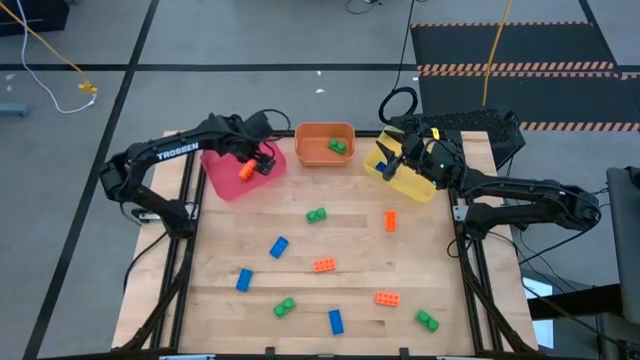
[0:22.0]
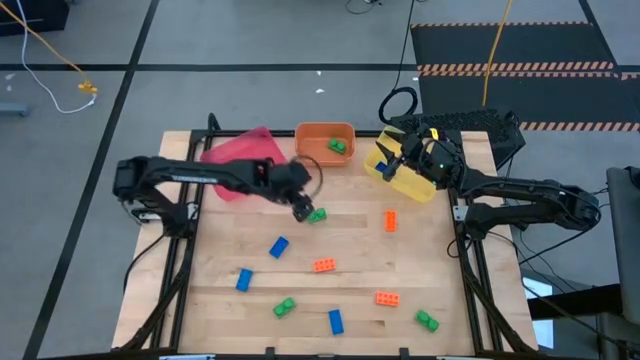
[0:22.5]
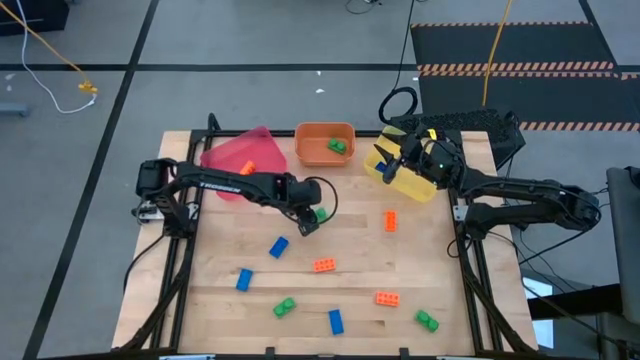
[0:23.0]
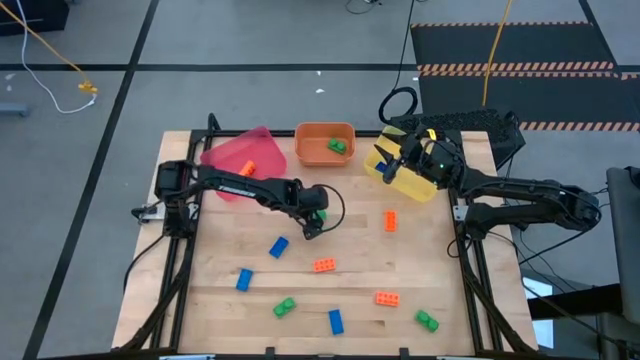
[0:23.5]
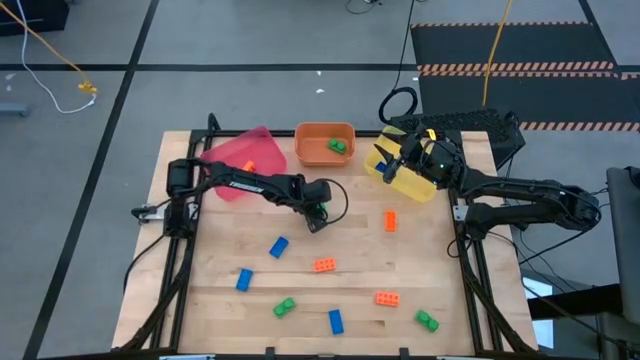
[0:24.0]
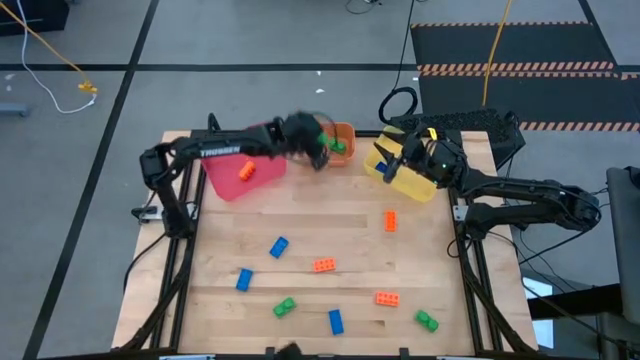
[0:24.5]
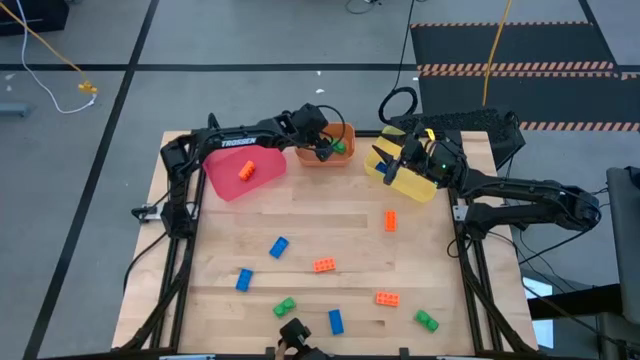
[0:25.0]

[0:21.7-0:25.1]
Task: Sort & place blocks by color
Put the green game piece into the orange bin

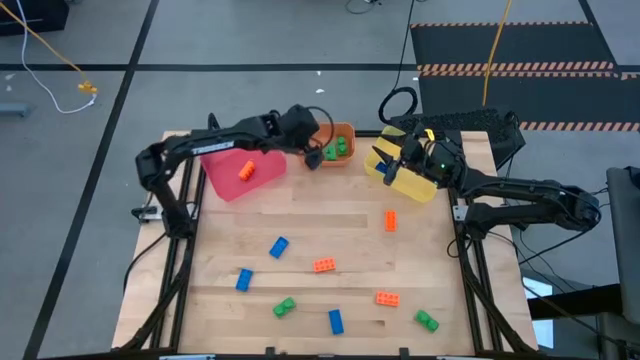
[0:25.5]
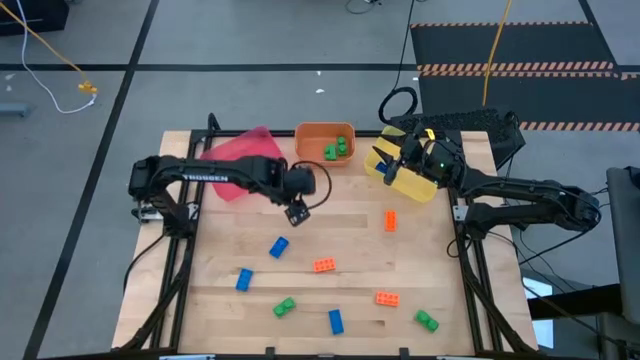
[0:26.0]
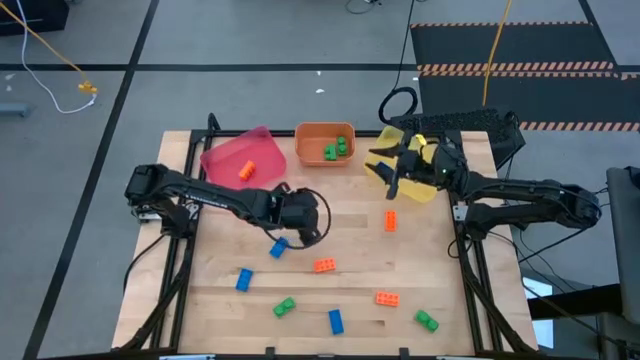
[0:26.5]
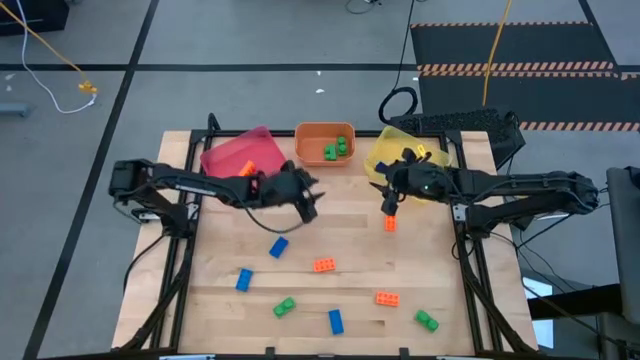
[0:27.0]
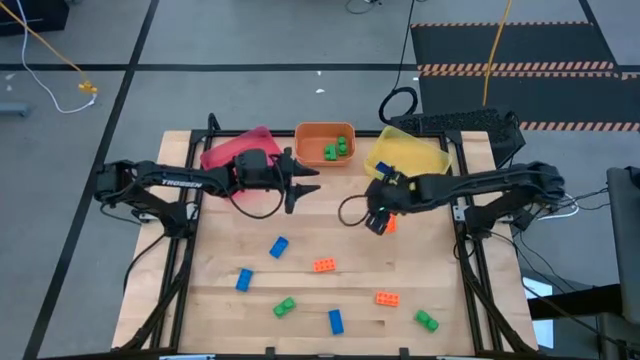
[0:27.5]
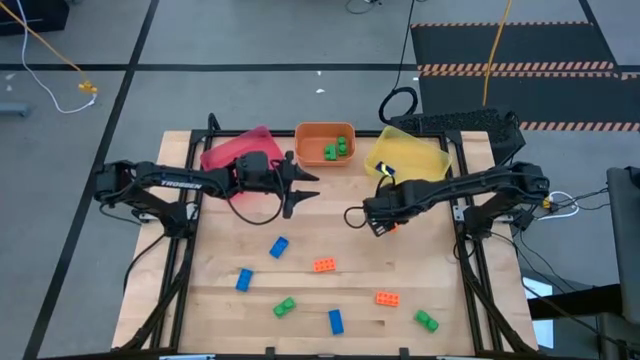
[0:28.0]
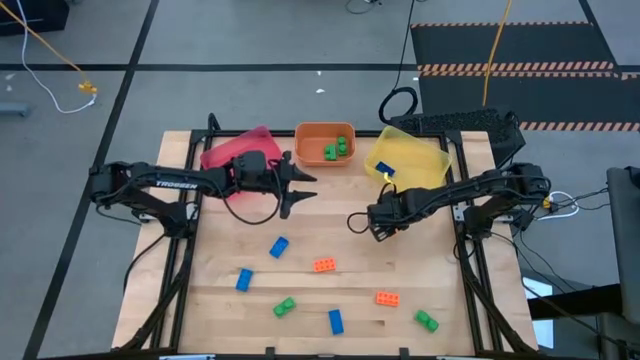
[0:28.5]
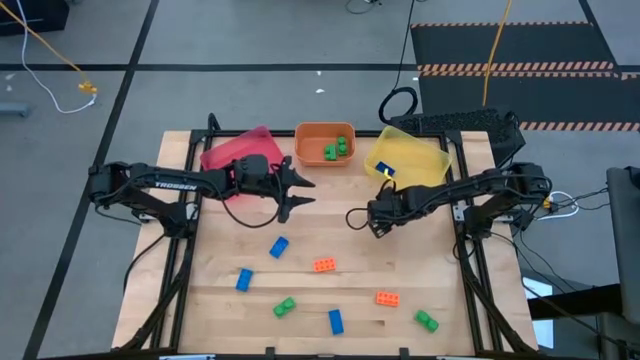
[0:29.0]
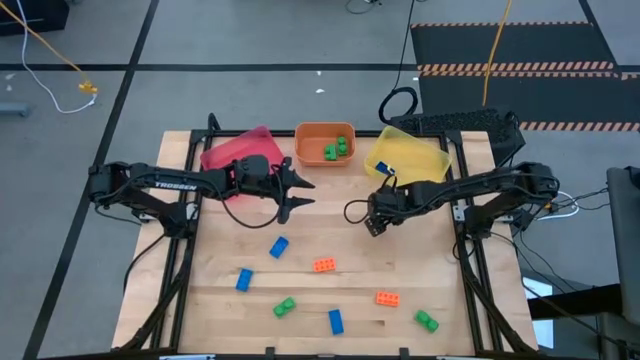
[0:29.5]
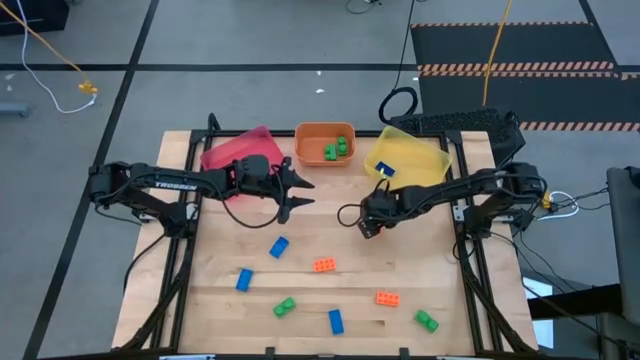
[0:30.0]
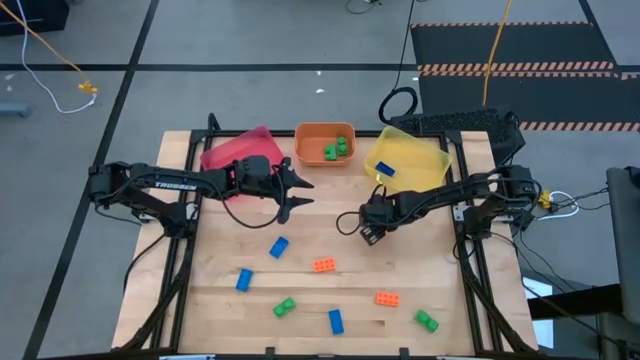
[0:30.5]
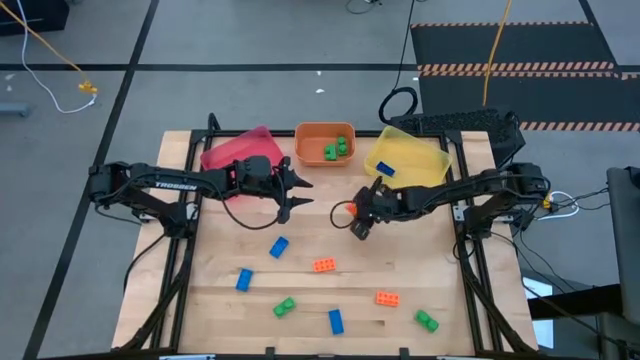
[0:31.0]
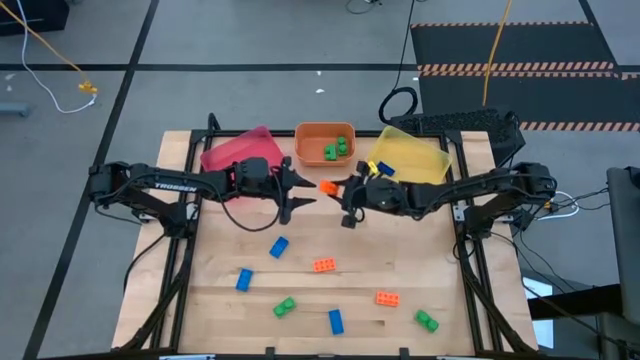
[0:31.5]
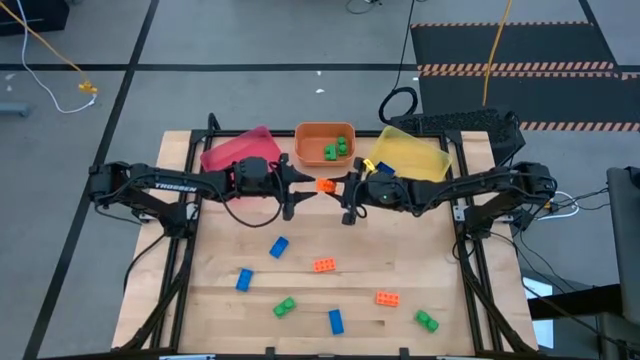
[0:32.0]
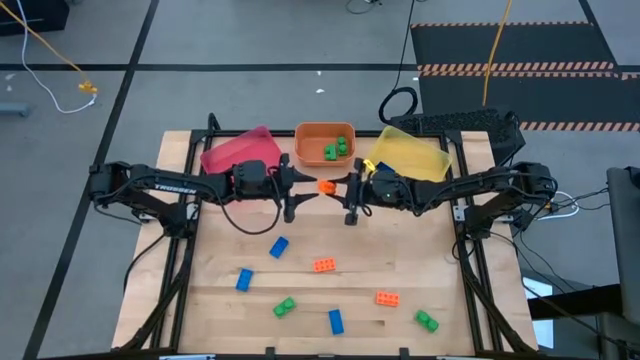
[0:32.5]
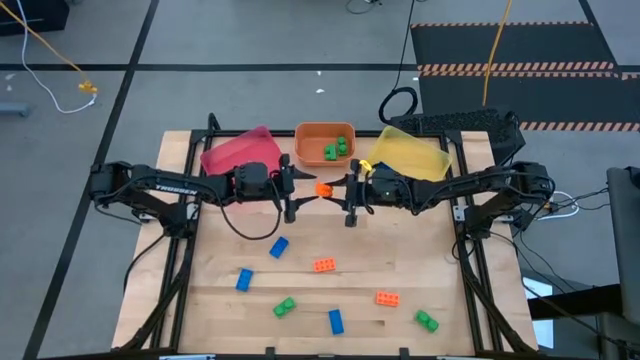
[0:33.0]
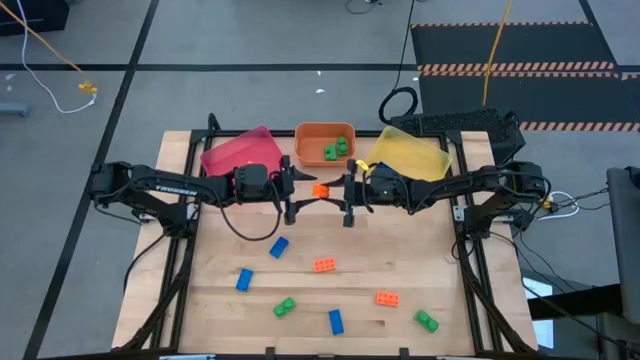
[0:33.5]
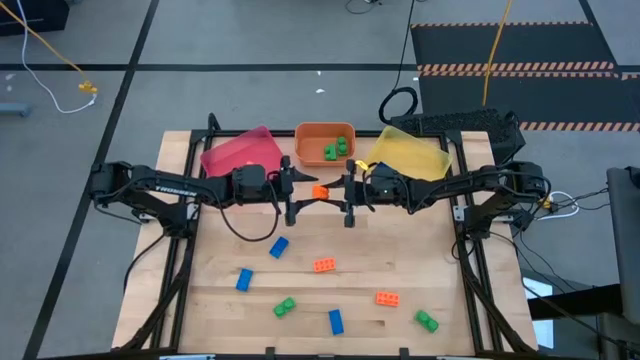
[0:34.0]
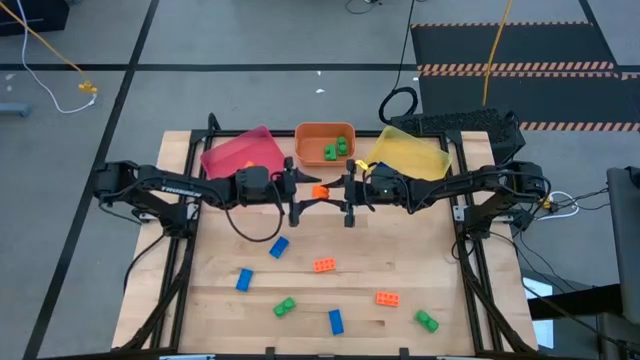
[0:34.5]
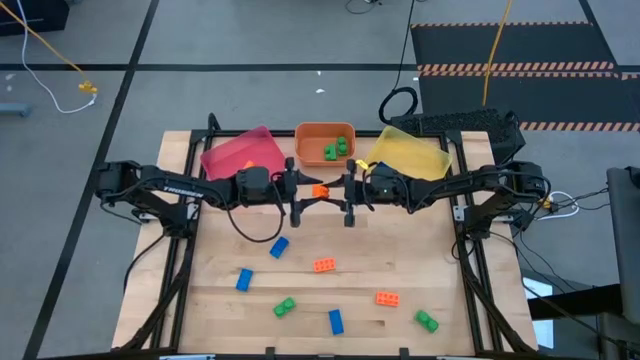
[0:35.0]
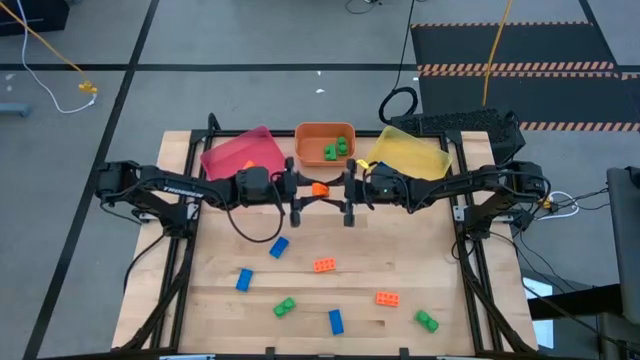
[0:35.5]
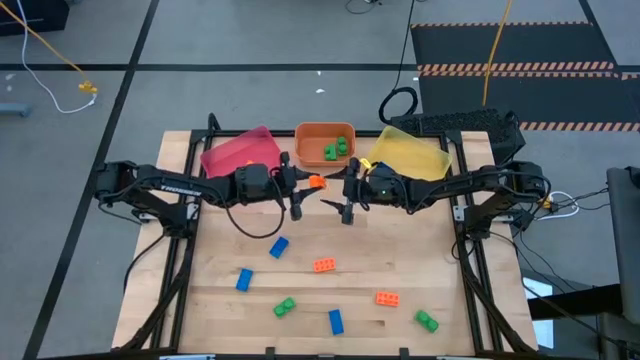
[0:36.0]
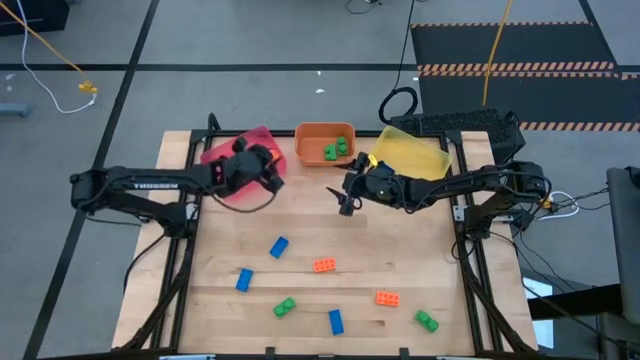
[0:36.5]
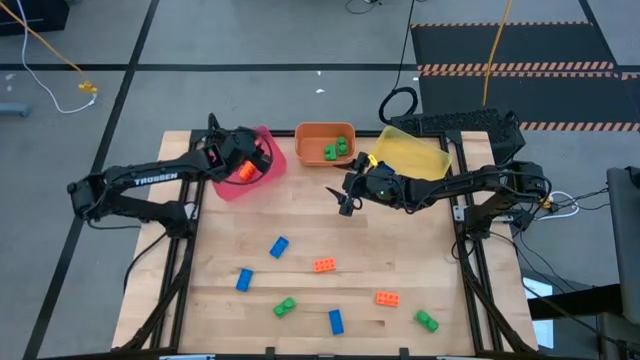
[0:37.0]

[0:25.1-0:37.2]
Put the orange game piece into the pink bin

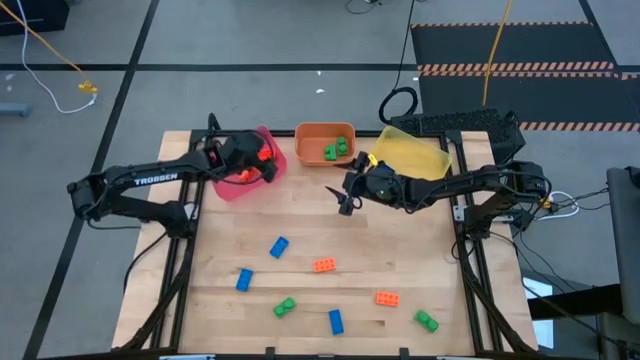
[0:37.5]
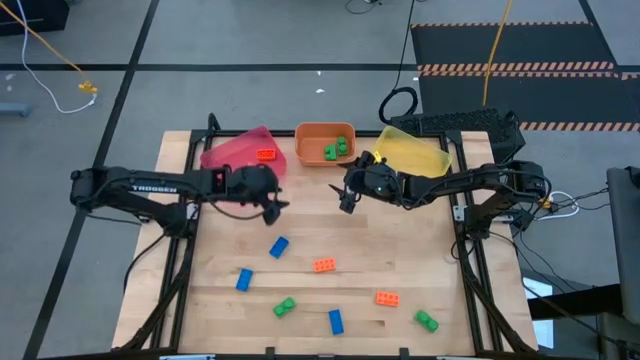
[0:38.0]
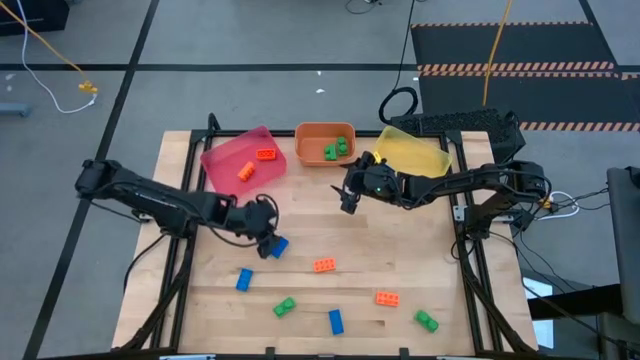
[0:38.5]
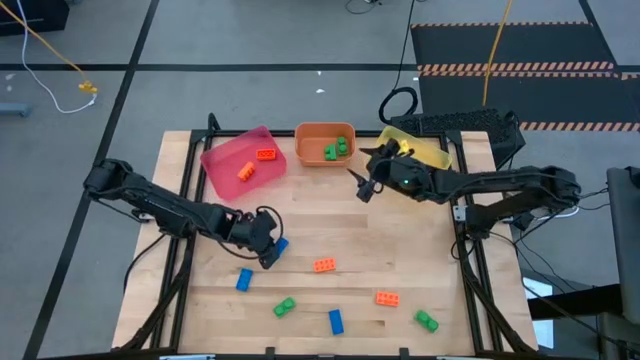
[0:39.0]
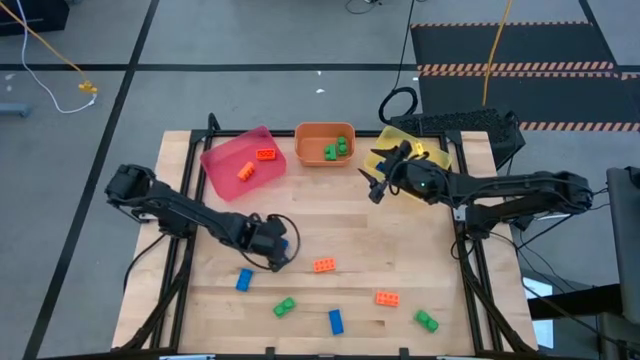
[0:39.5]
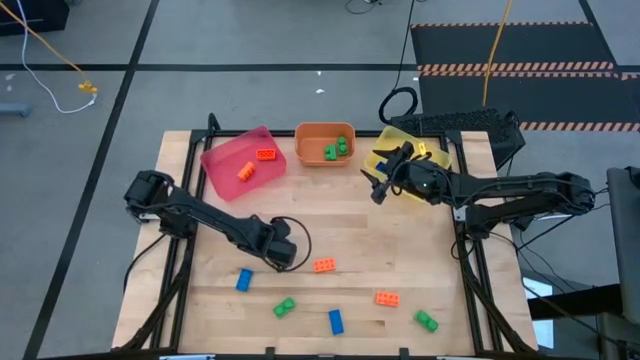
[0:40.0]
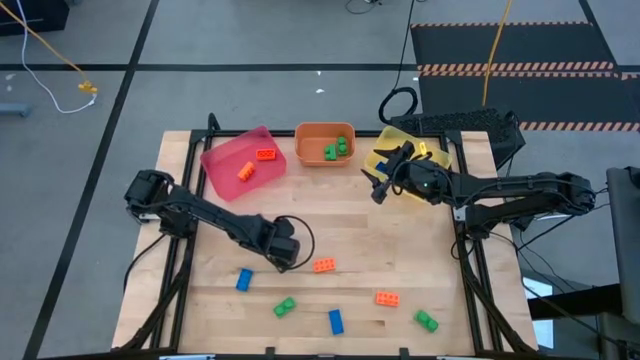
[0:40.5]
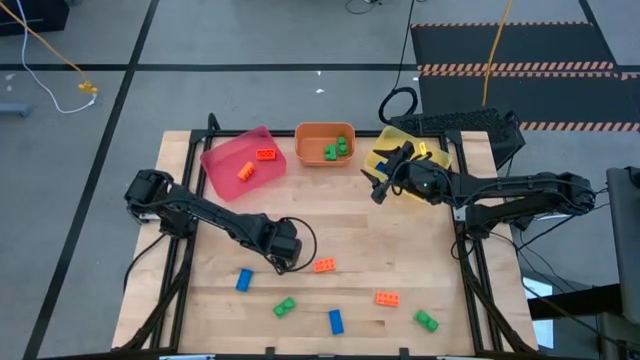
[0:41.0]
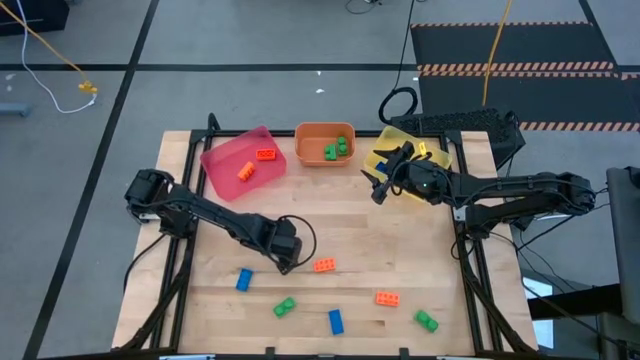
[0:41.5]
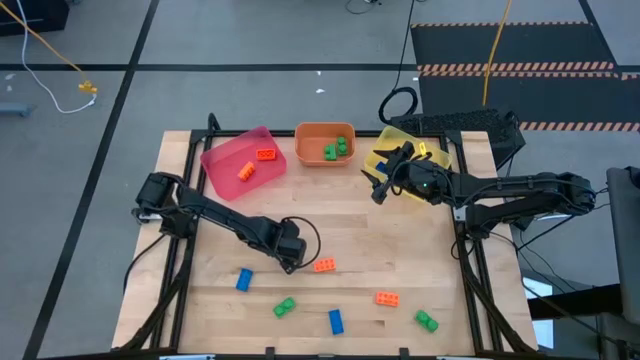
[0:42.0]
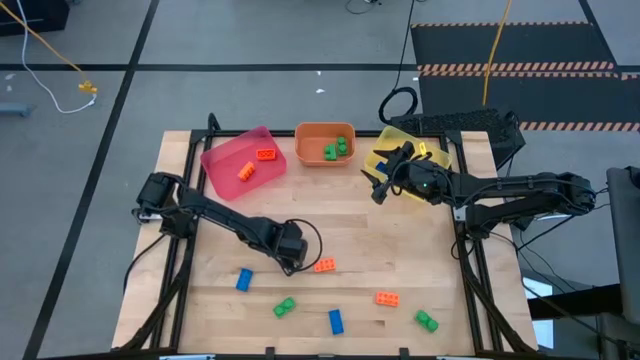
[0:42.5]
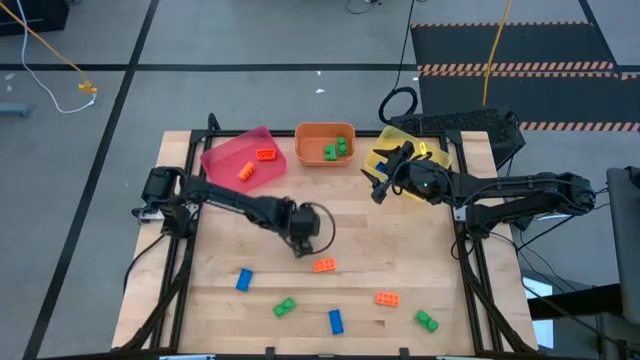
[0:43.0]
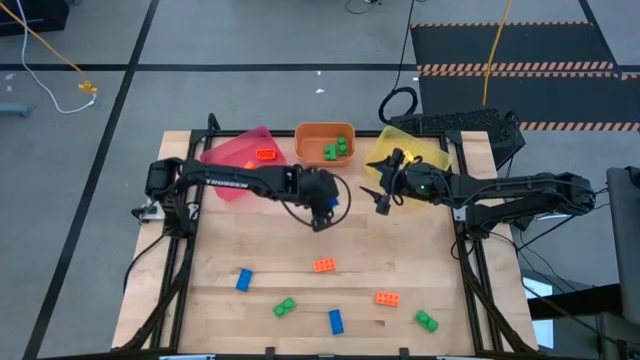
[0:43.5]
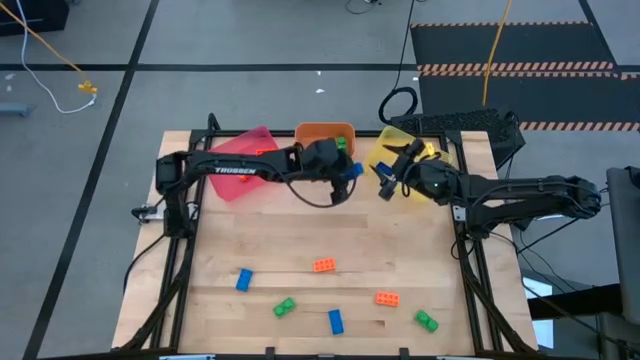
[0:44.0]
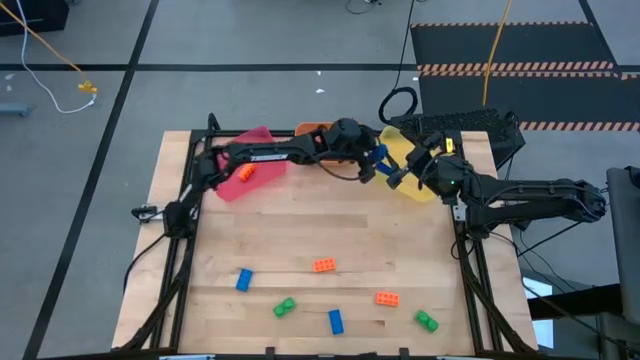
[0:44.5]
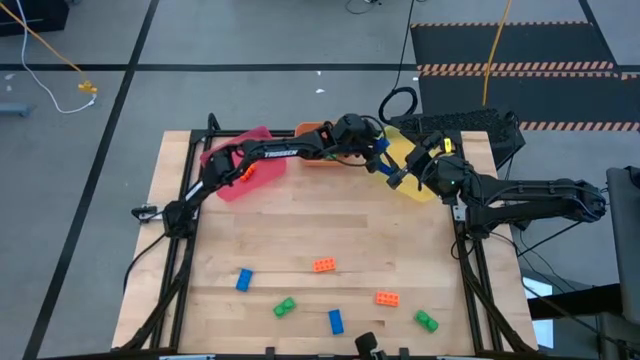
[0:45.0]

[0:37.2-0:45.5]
Put the blue game piece into the yellow bin
